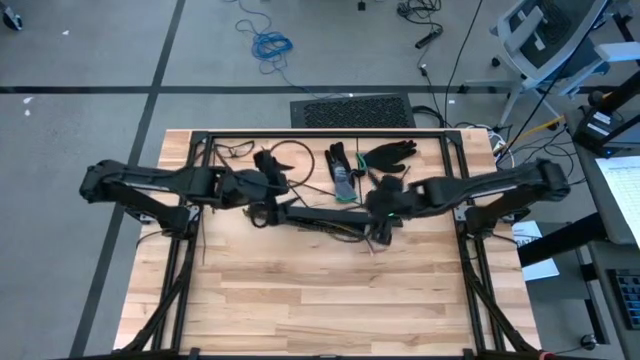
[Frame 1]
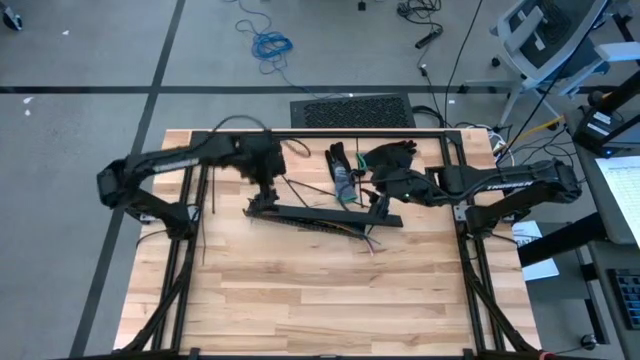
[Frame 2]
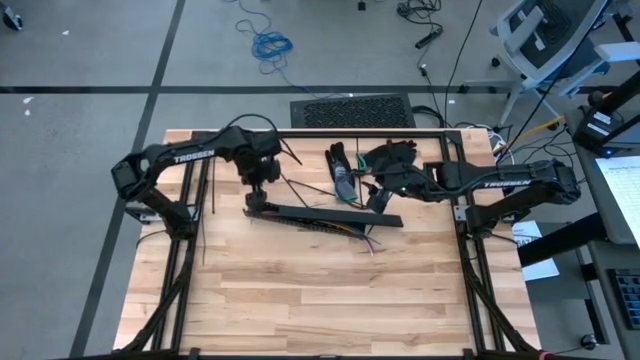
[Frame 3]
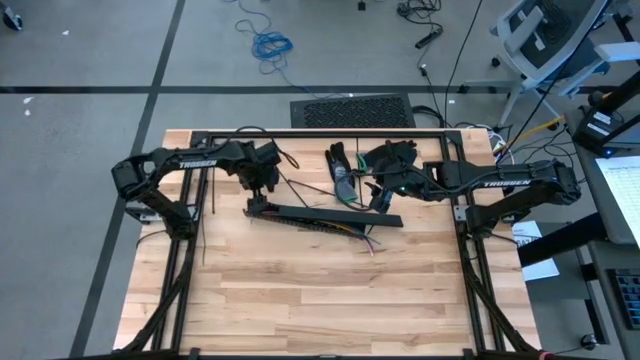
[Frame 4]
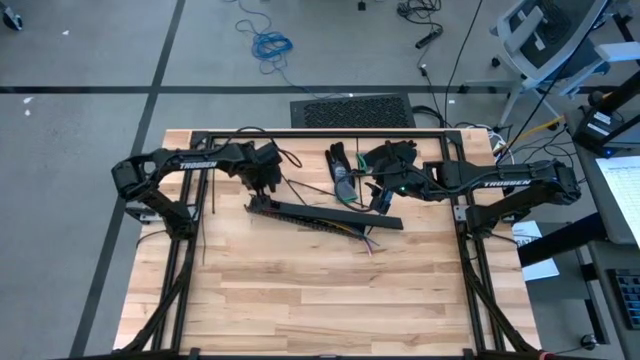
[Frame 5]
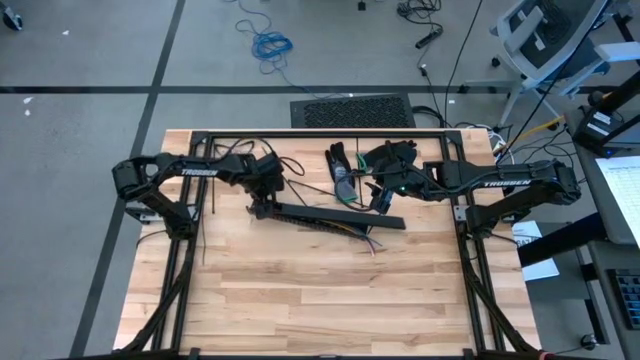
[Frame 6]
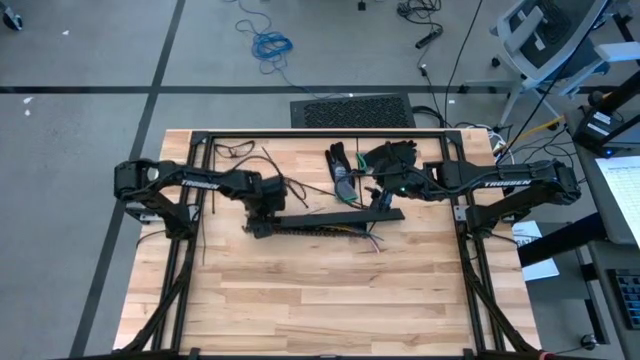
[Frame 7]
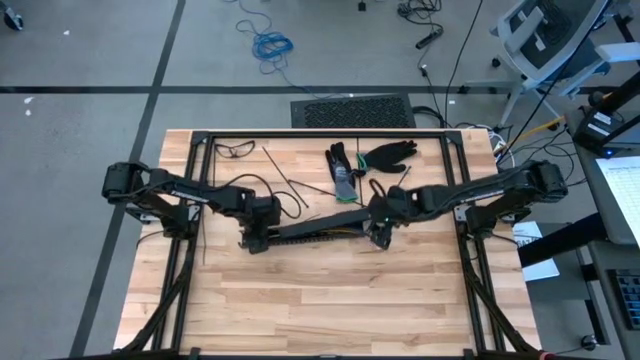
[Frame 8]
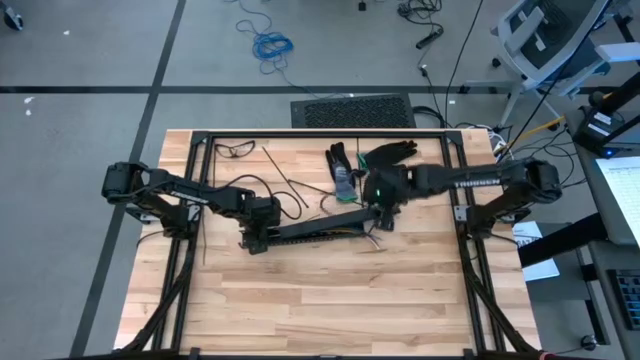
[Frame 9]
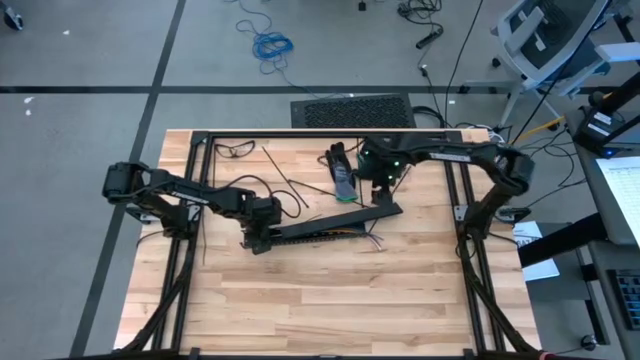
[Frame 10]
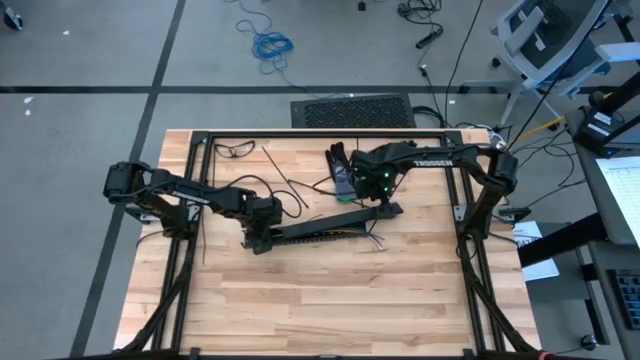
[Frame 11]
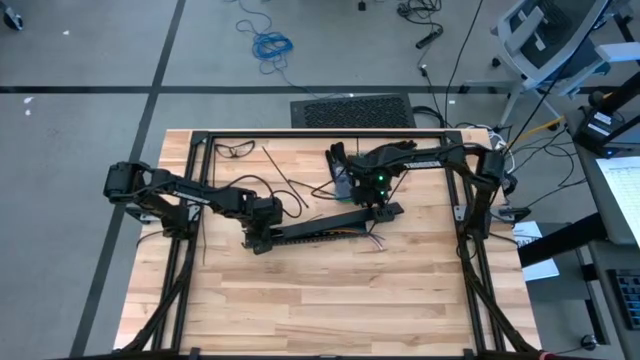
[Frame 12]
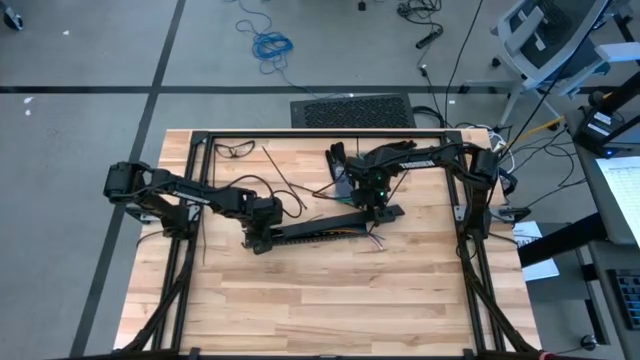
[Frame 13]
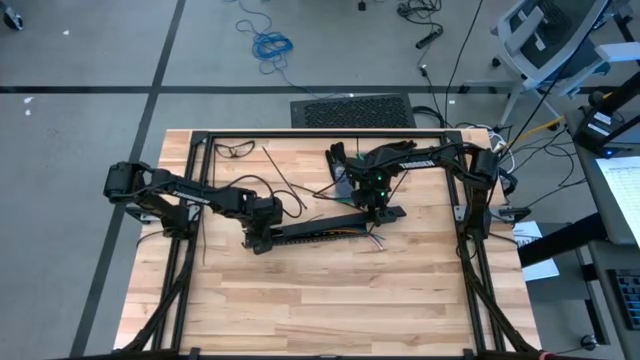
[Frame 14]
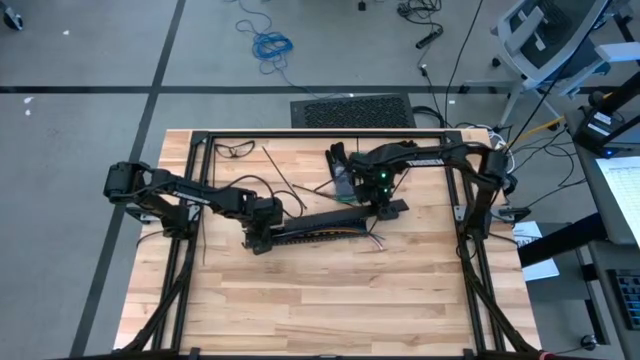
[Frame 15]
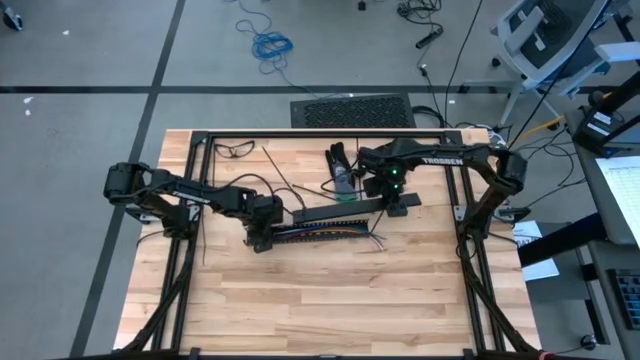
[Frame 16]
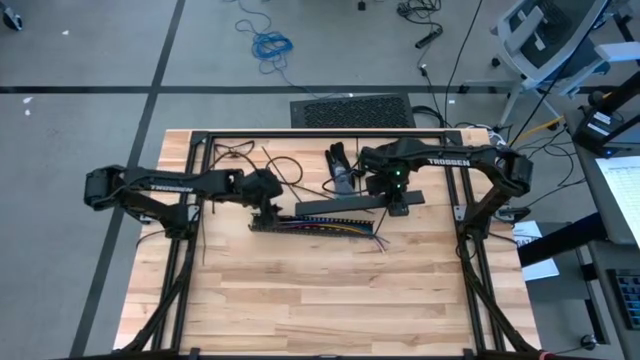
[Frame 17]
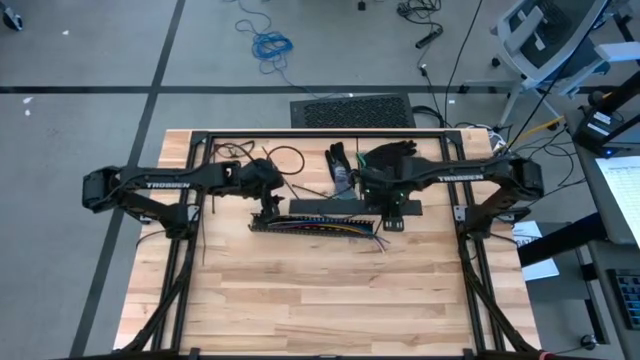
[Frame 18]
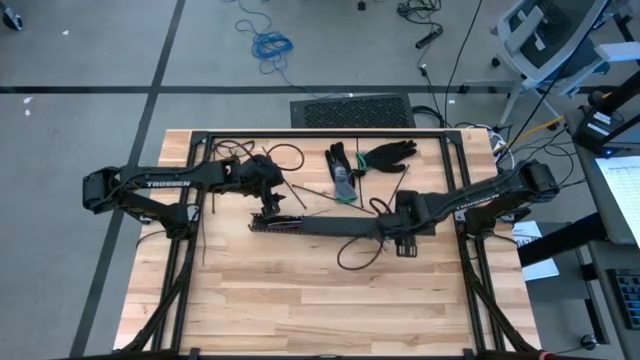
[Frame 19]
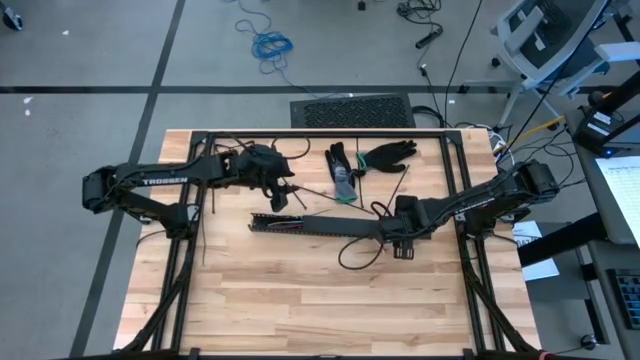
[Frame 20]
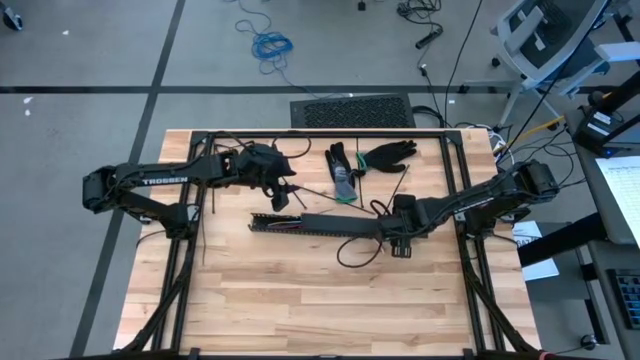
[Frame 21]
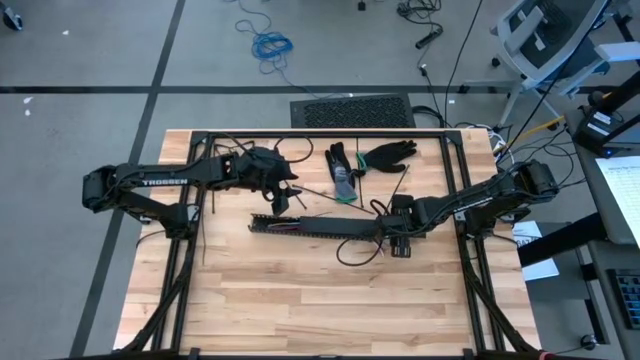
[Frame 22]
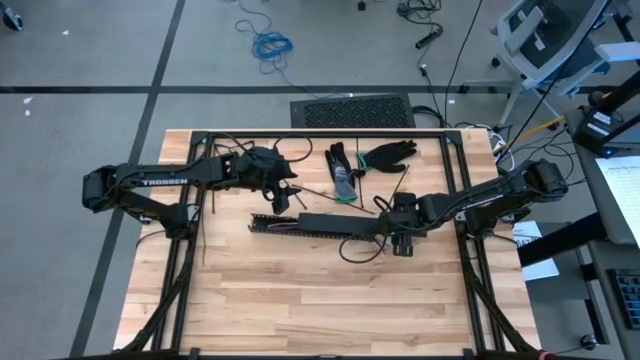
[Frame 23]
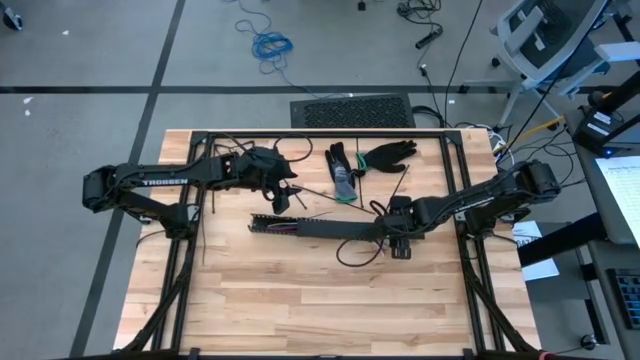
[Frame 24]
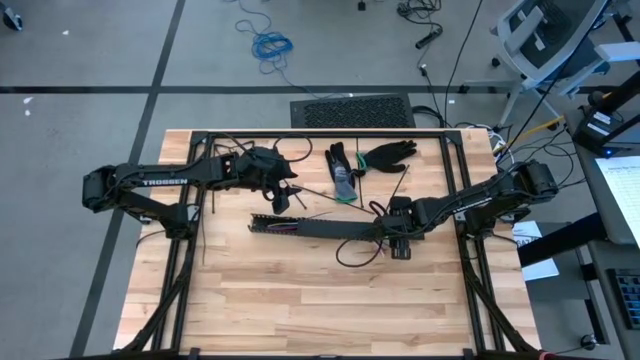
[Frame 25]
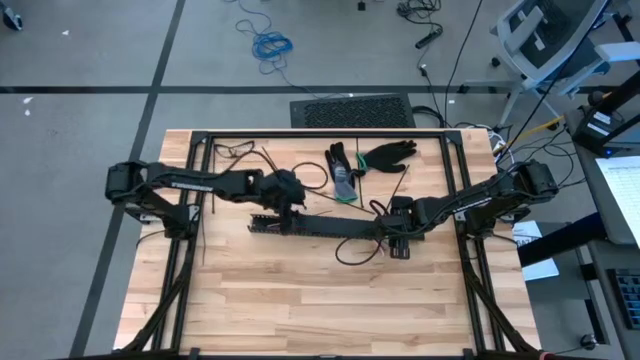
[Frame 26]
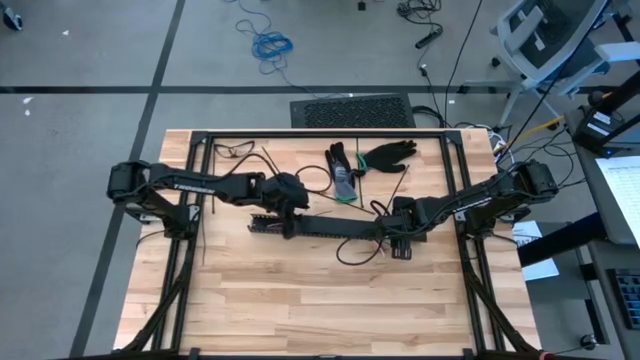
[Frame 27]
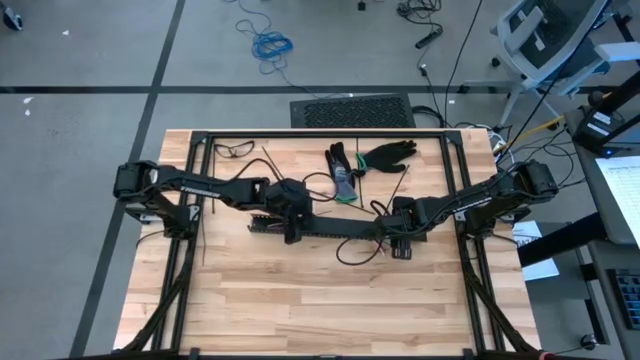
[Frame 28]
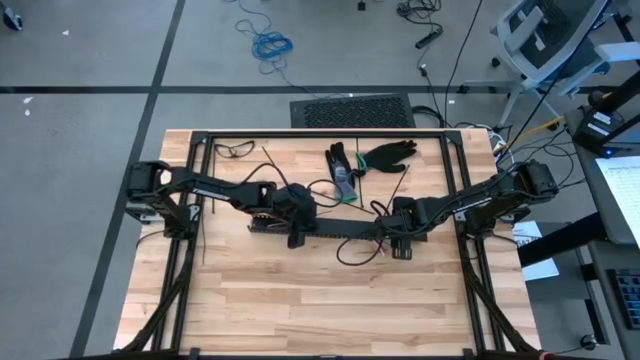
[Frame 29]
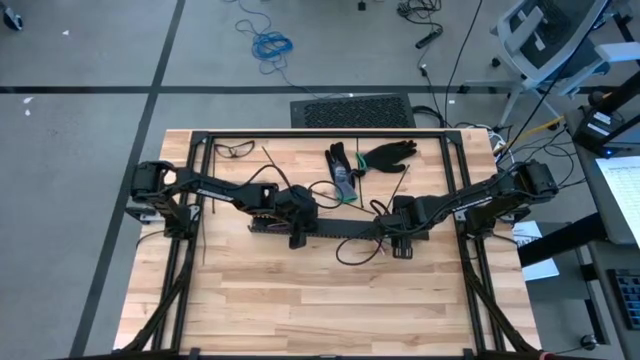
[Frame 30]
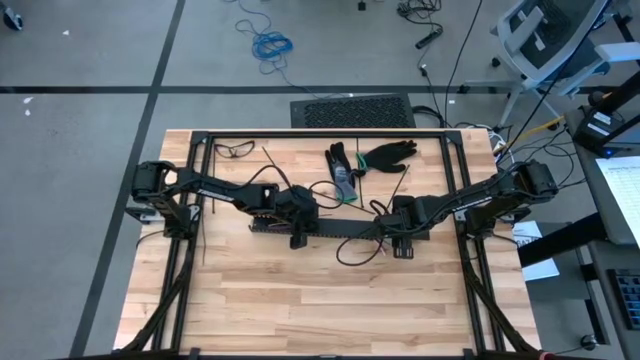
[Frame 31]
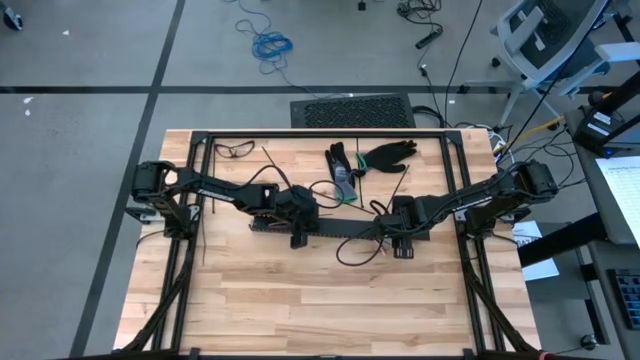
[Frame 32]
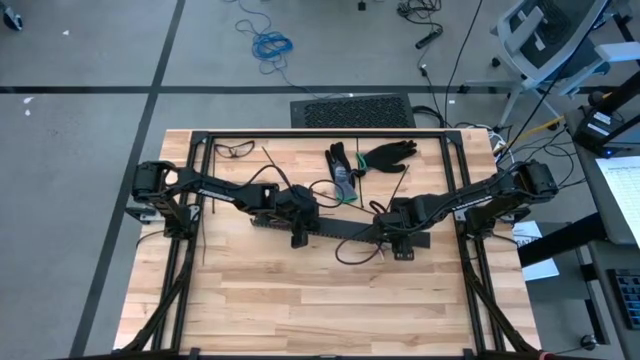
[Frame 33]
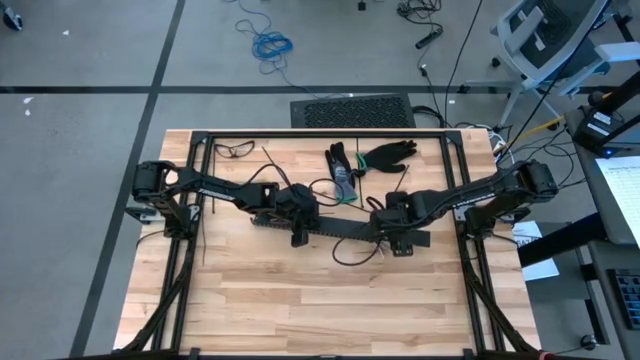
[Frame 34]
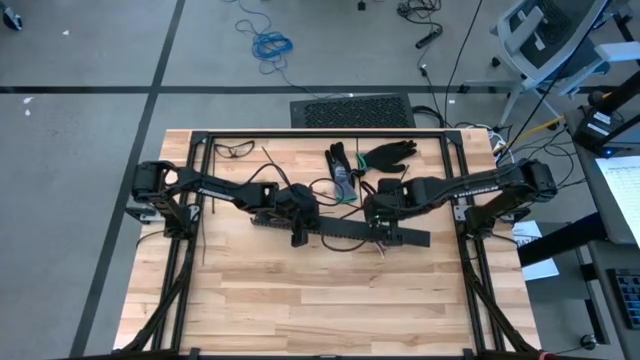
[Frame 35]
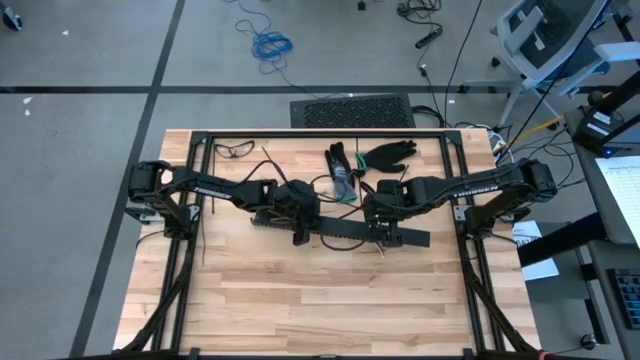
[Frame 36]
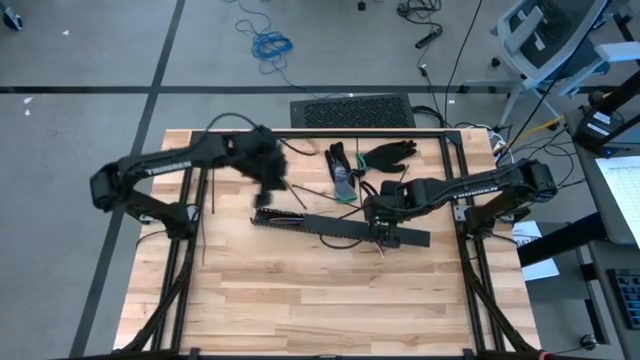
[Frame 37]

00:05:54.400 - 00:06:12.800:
Task: Ziptie cables
Close the black cable duct

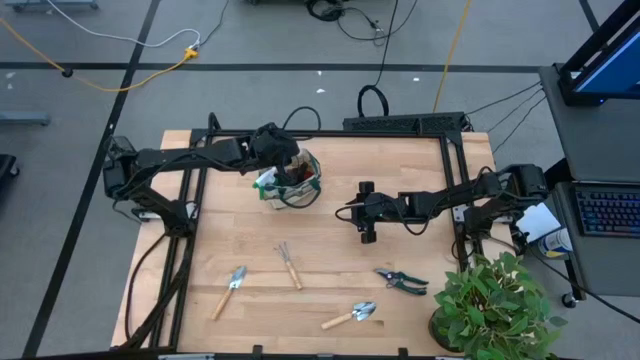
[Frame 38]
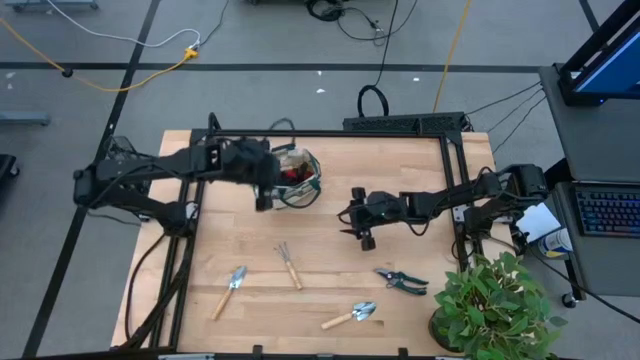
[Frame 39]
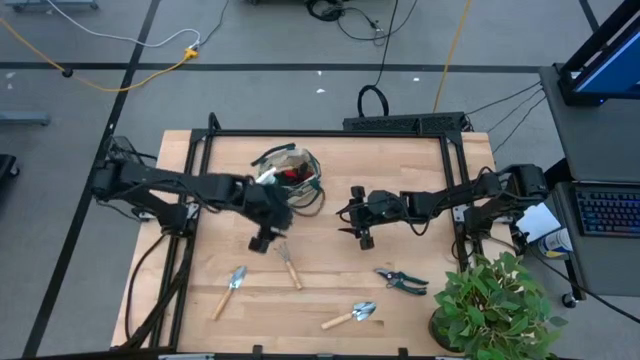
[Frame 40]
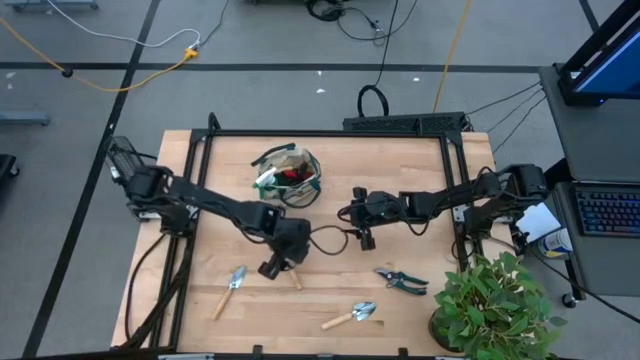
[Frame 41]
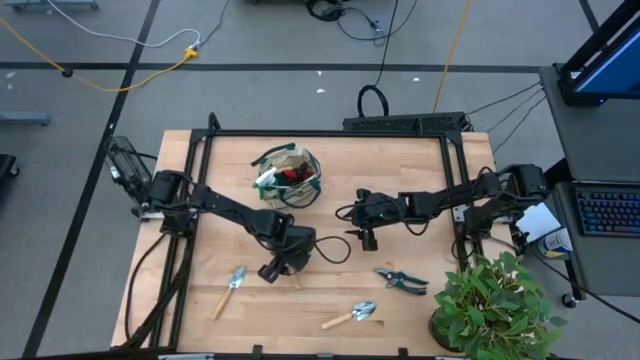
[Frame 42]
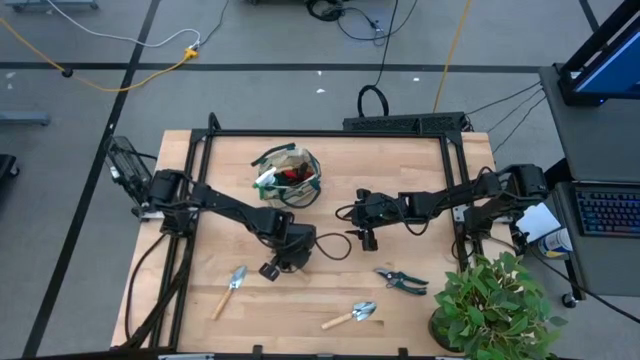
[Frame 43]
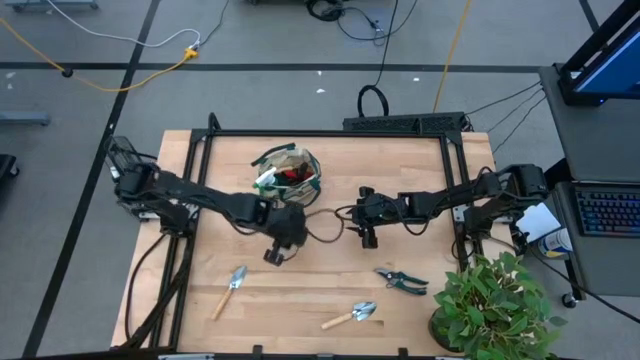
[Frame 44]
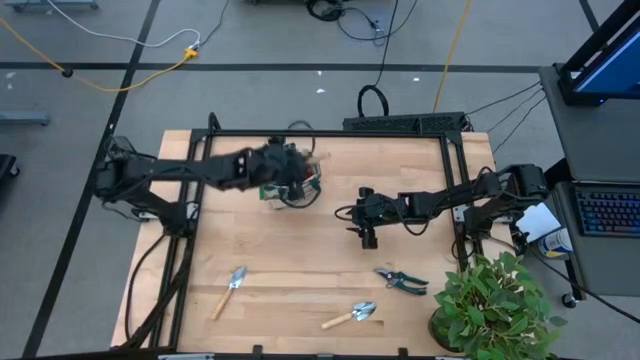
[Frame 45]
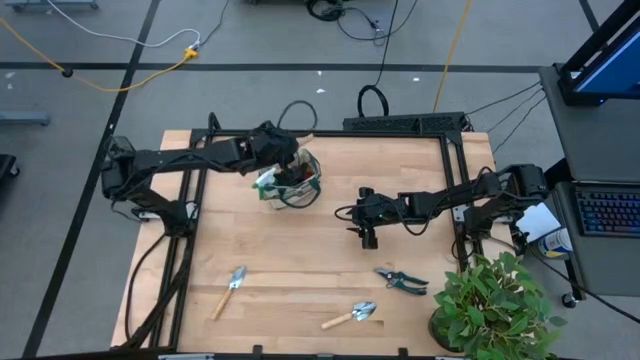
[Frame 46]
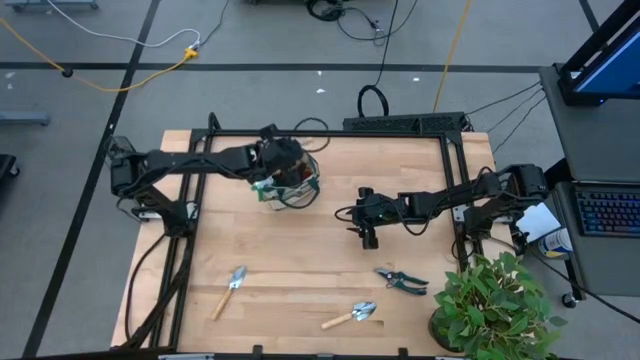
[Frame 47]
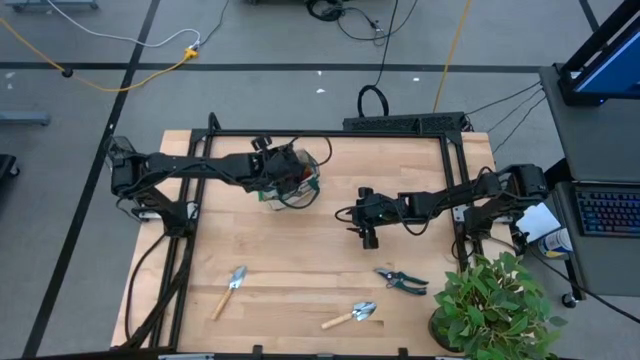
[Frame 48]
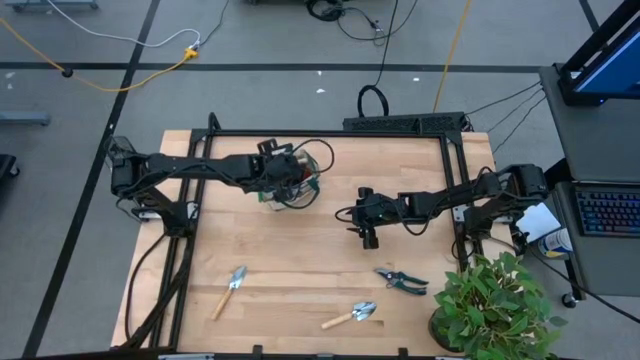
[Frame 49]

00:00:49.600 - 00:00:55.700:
Task: Pick & Place Garden tools in Gardening bag
Put the hand rake into the gardening bag
